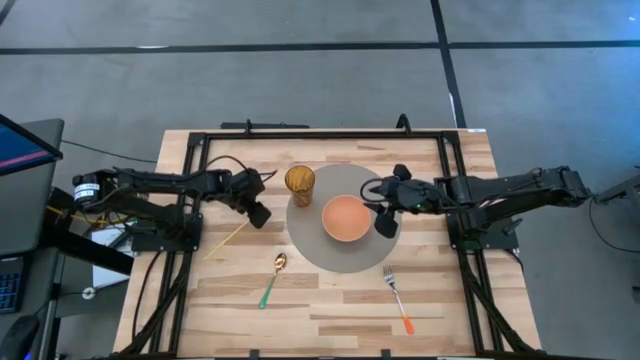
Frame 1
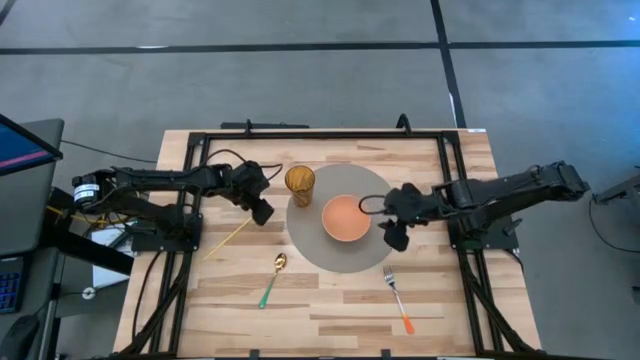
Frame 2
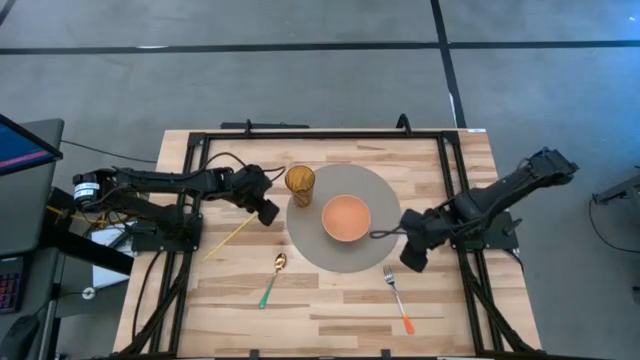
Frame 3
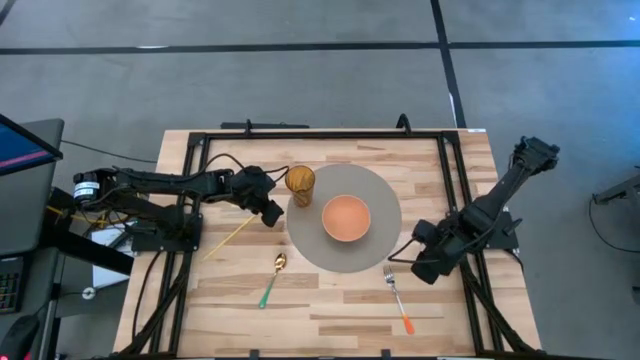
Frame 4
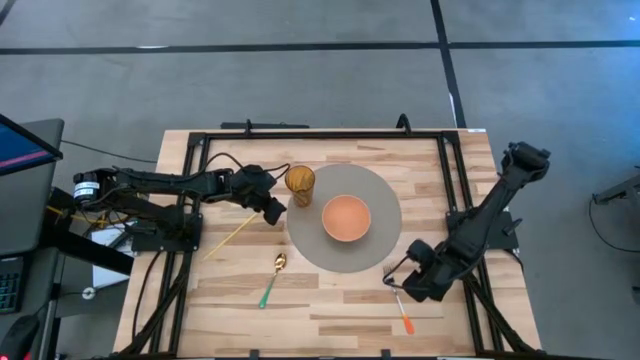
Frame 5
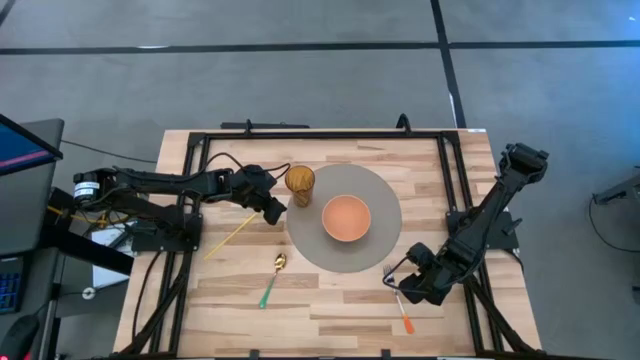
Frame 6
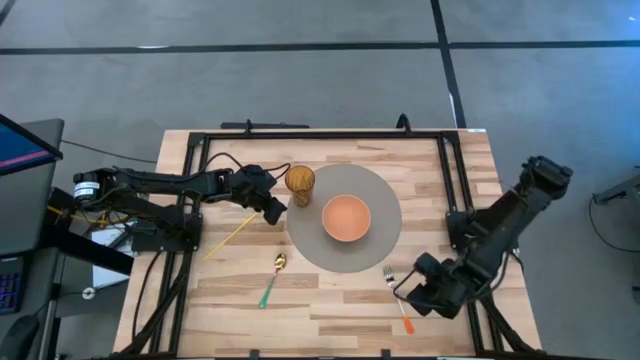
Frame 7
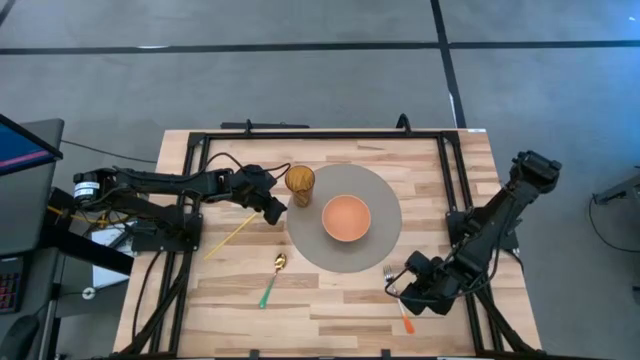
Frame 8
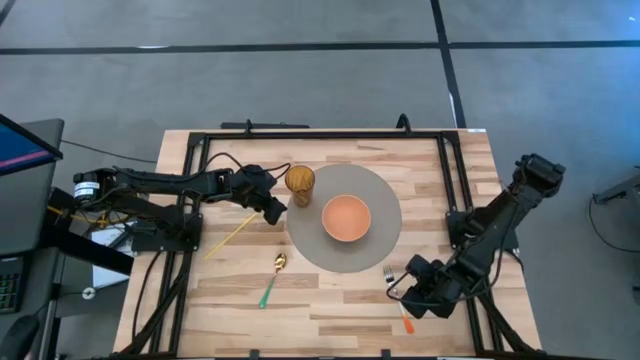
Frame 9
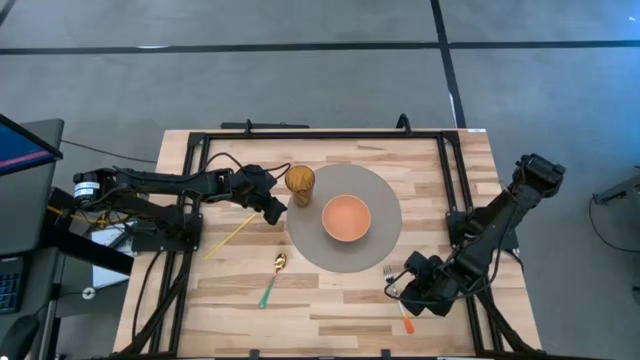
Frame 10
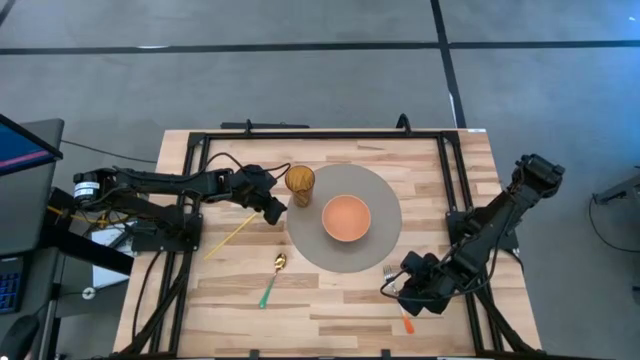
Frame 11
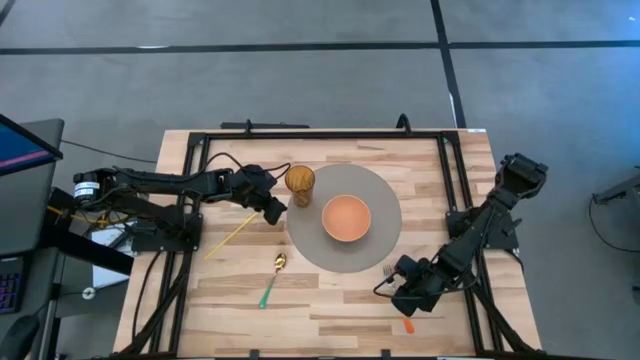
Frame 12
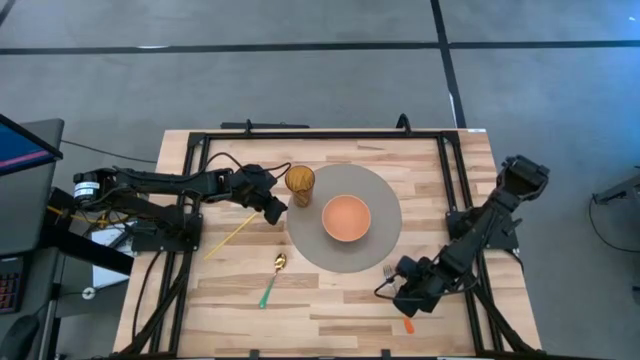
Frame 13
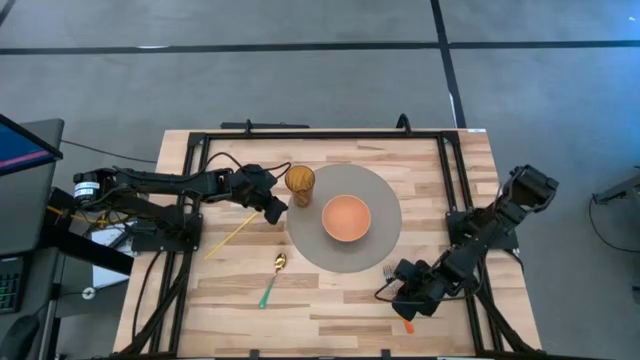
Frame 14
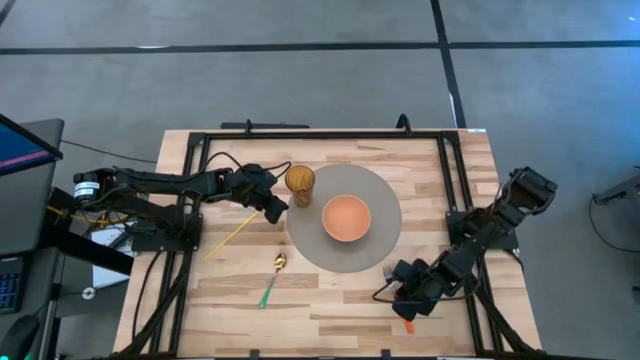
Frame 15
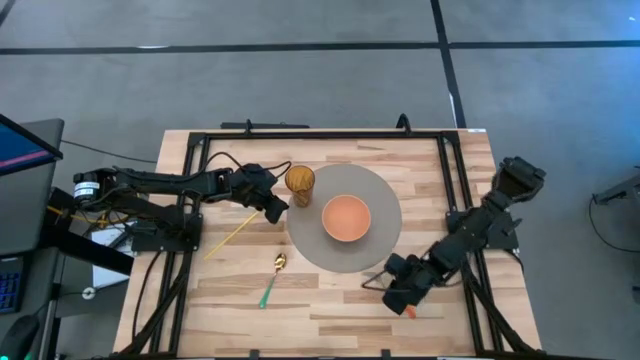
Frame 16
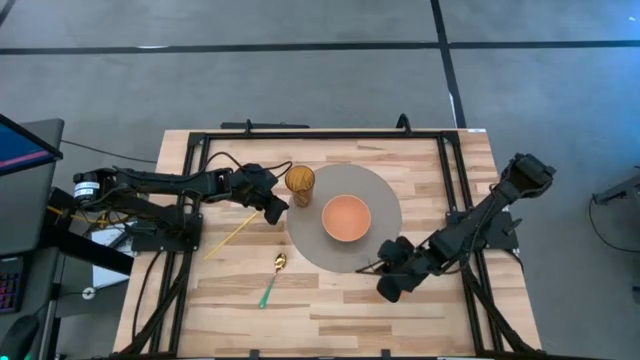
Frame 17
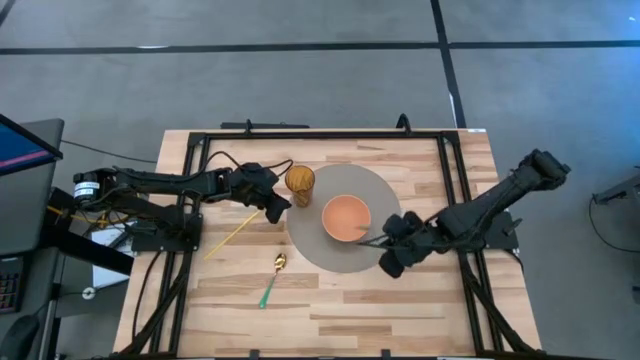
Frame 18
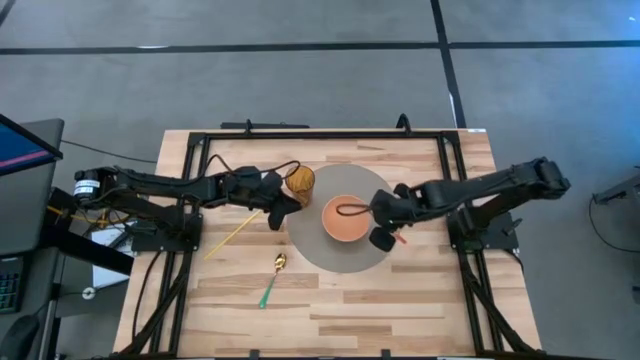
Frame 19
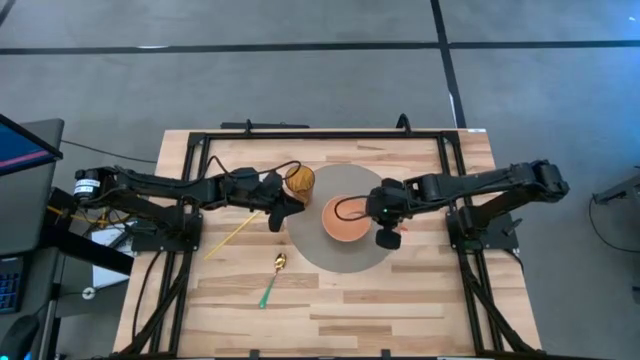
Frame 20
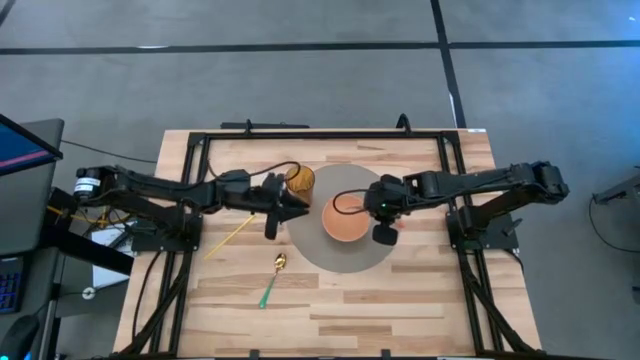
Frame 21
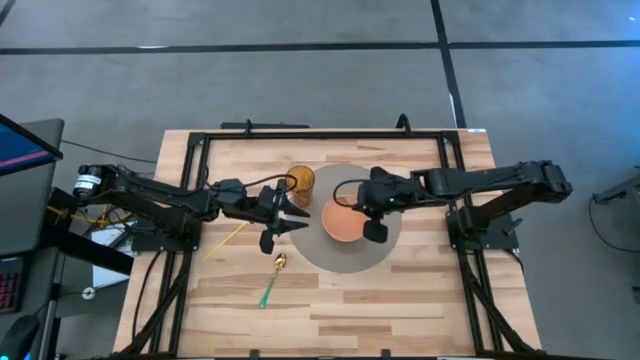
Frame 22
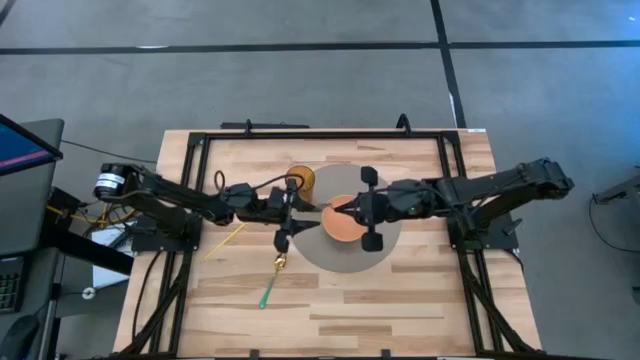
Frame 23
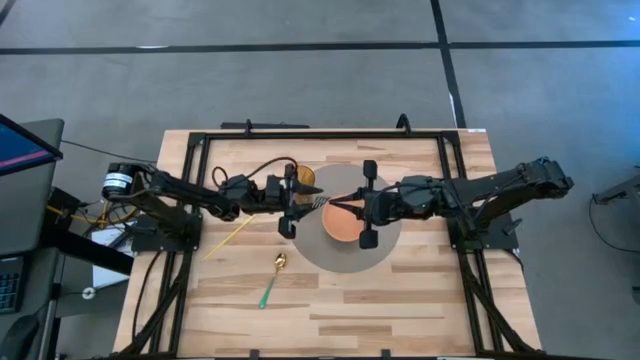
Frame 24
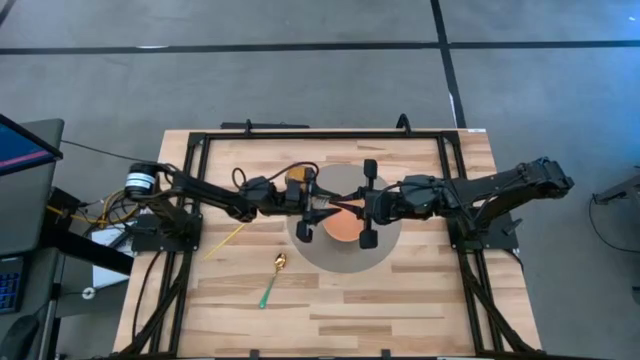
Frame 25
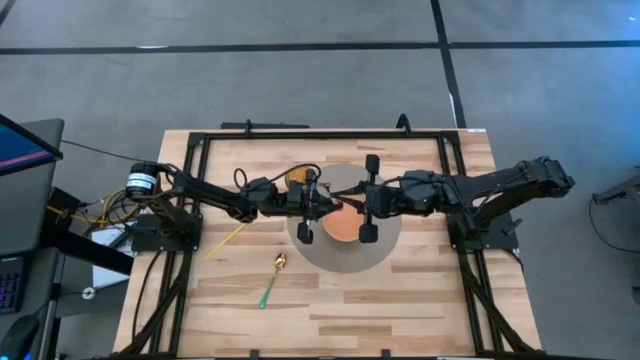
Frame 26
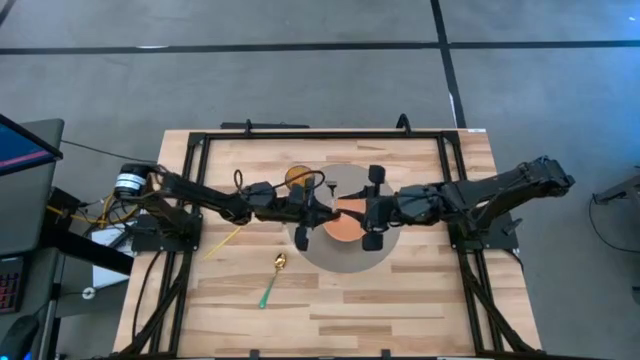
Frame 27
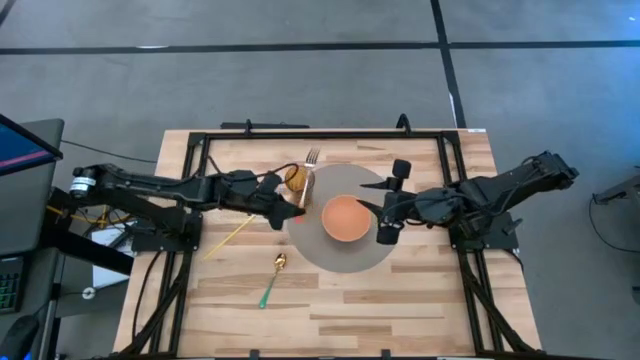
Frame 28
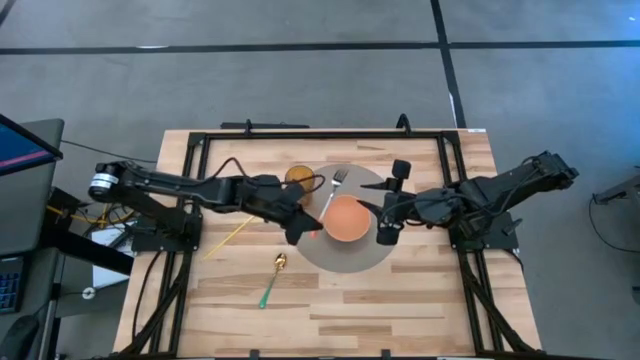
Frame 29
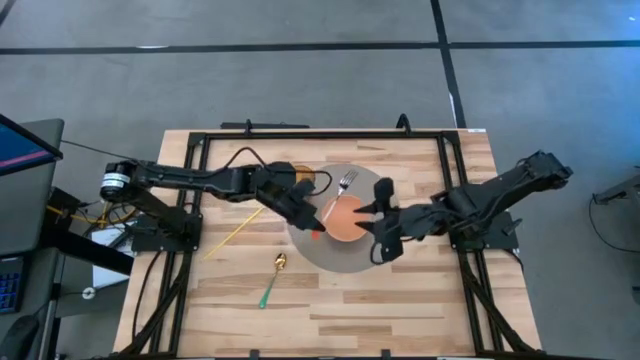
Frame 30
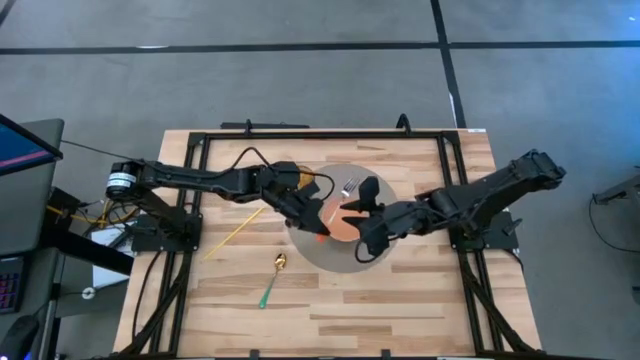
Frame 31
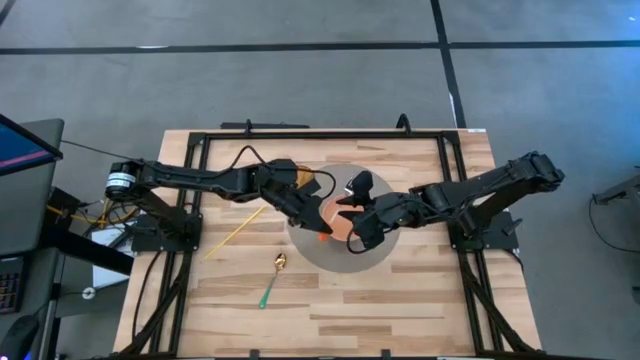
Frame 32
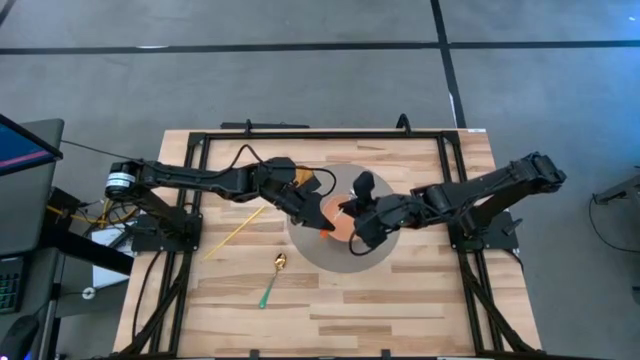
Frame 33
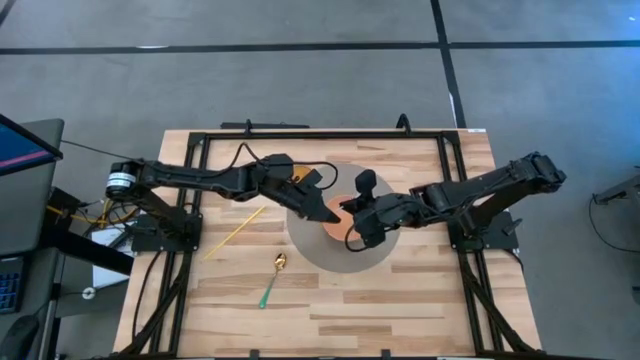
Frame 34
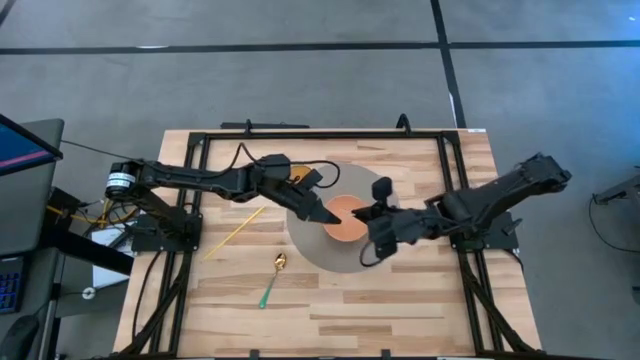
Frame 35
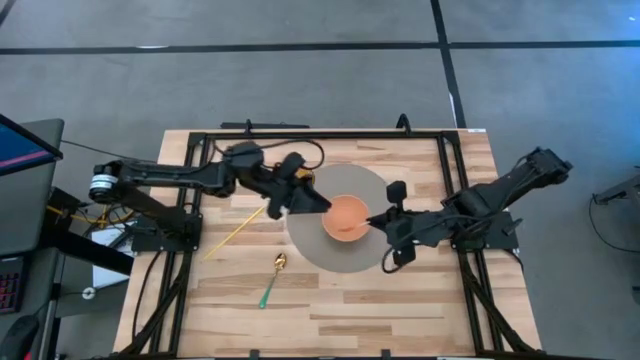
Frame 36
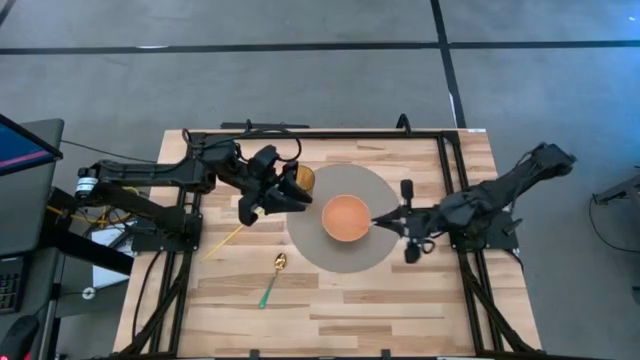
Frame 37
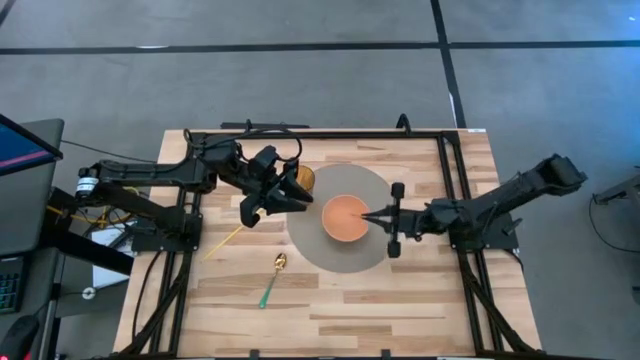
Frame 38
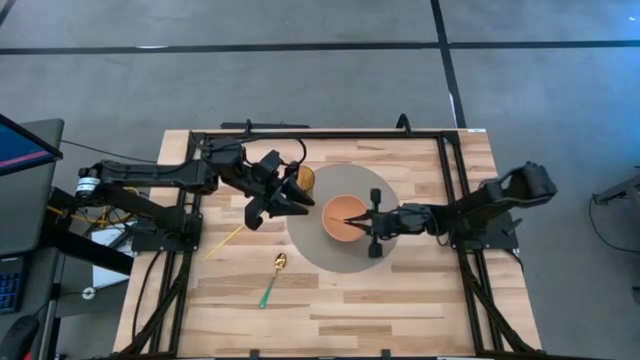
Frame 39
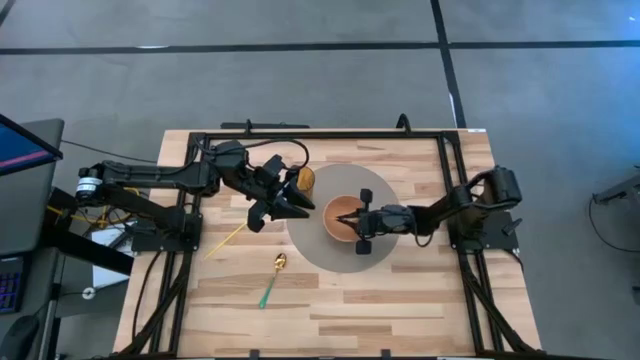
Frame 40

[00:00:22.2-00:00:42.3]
Task: Pick & Place Utensil
Put the orange silver fork into the light pink bowl
